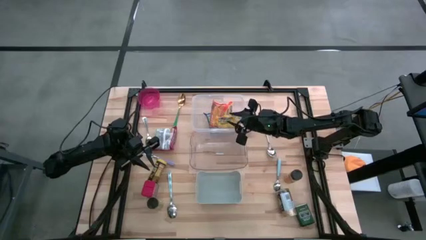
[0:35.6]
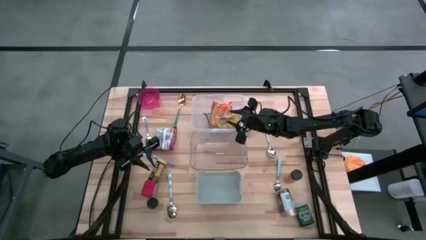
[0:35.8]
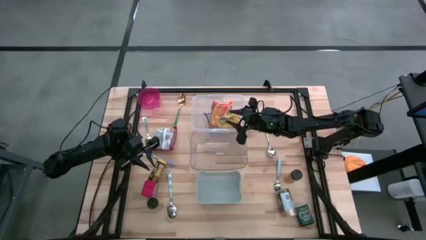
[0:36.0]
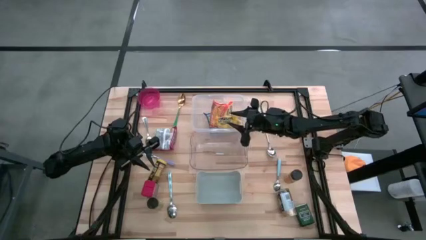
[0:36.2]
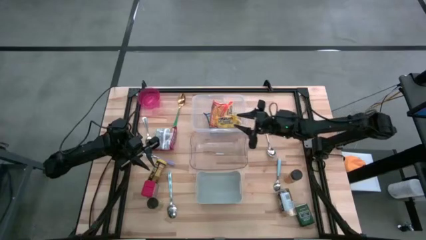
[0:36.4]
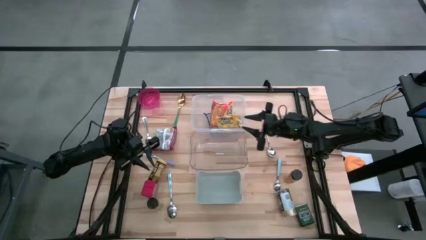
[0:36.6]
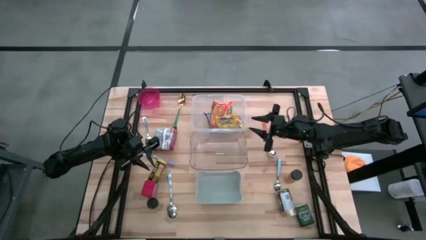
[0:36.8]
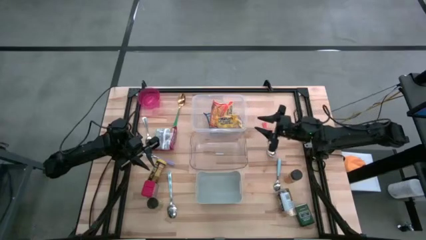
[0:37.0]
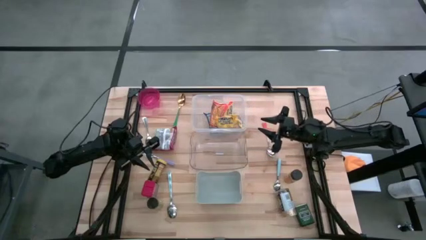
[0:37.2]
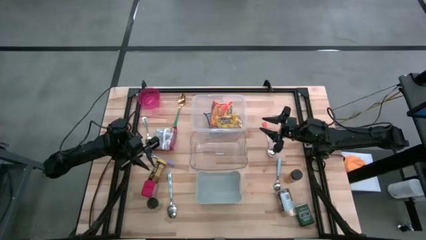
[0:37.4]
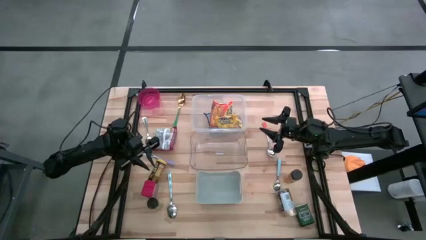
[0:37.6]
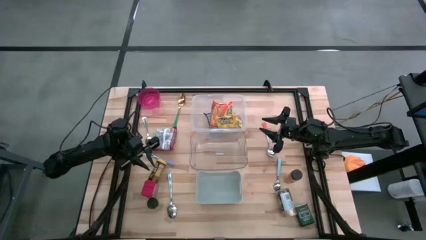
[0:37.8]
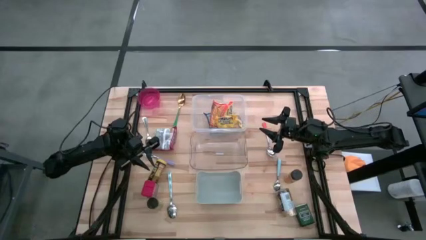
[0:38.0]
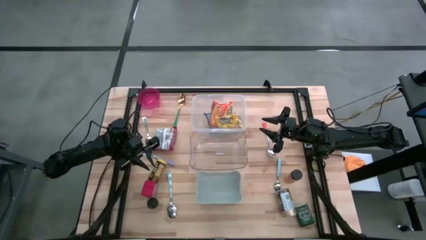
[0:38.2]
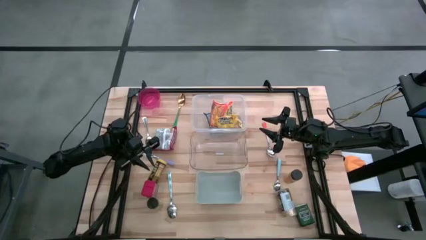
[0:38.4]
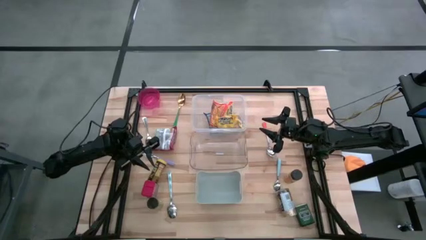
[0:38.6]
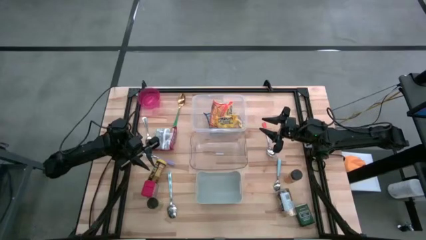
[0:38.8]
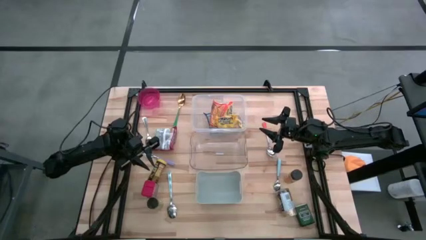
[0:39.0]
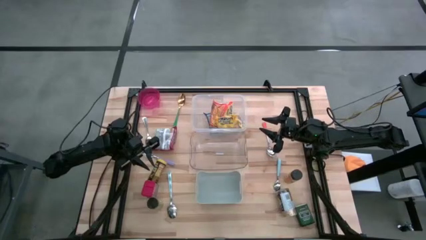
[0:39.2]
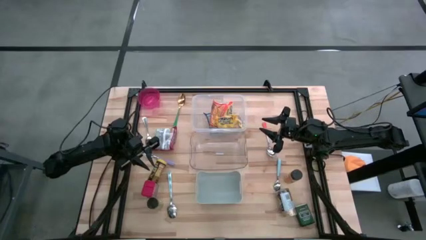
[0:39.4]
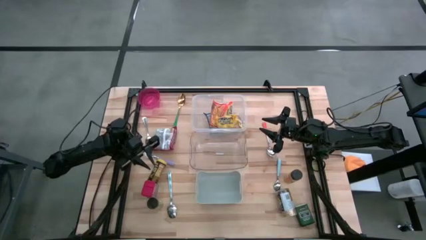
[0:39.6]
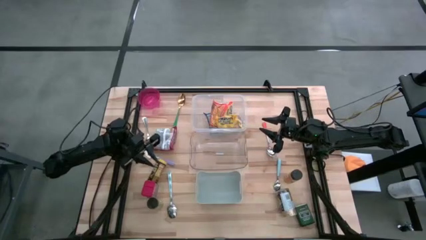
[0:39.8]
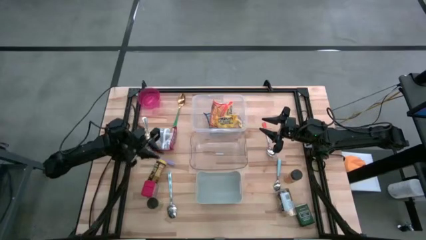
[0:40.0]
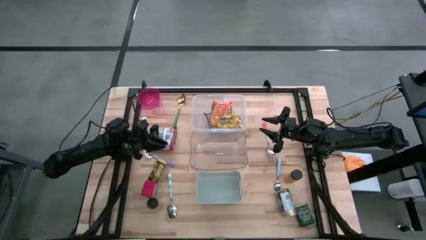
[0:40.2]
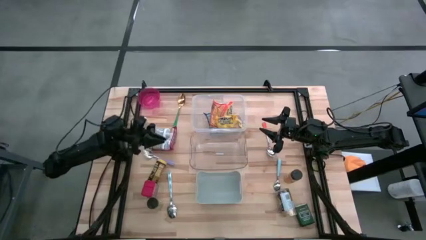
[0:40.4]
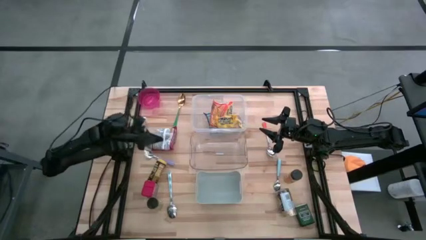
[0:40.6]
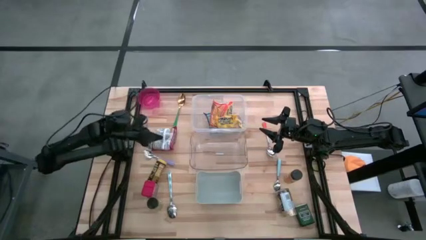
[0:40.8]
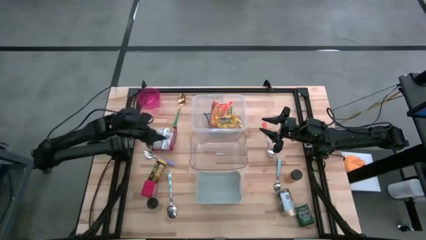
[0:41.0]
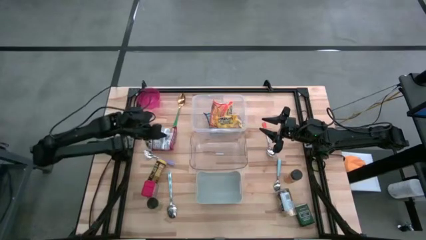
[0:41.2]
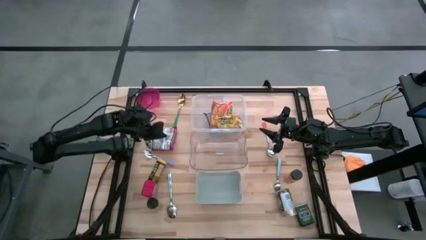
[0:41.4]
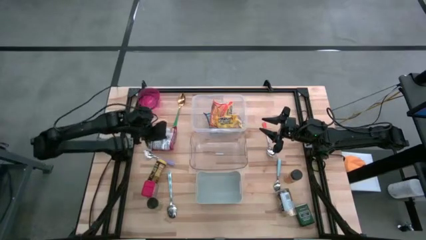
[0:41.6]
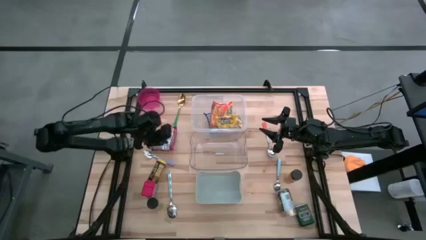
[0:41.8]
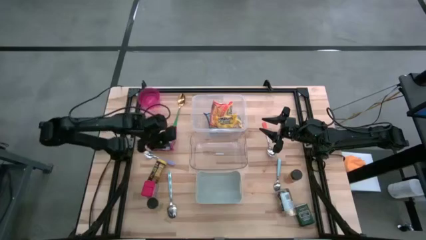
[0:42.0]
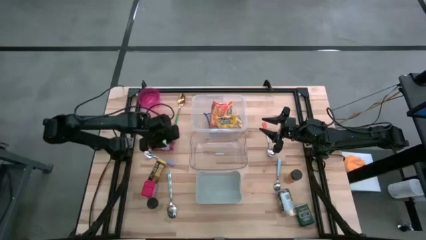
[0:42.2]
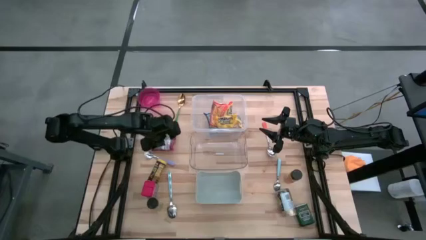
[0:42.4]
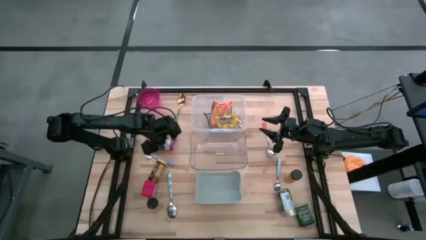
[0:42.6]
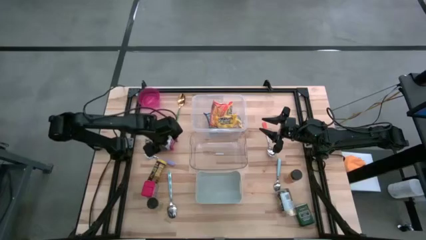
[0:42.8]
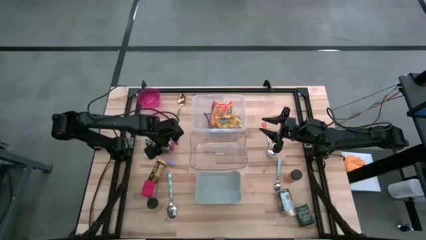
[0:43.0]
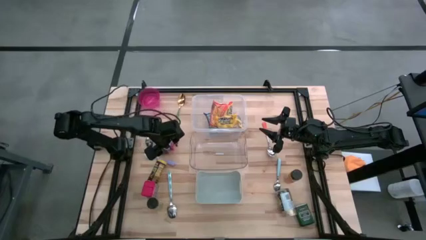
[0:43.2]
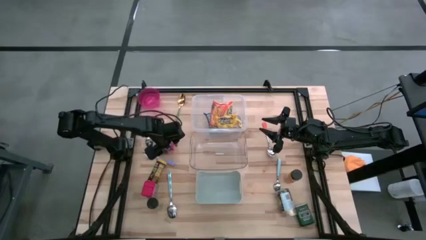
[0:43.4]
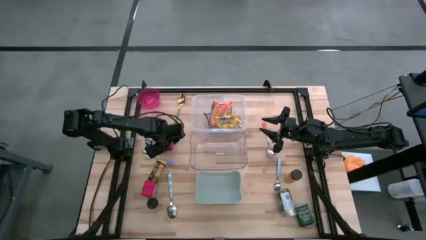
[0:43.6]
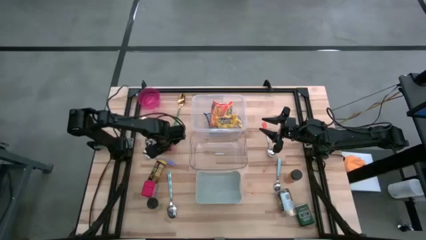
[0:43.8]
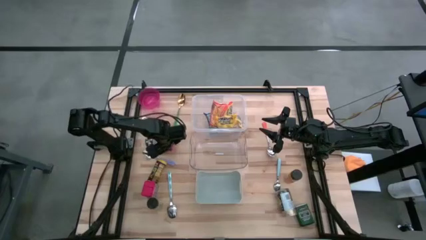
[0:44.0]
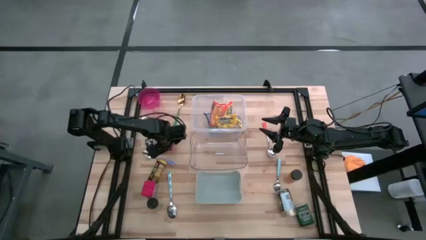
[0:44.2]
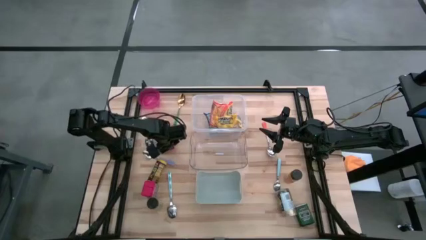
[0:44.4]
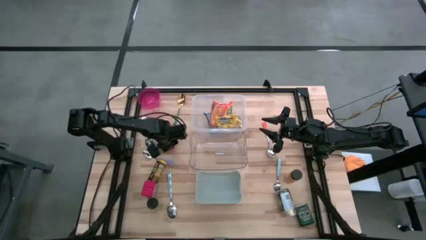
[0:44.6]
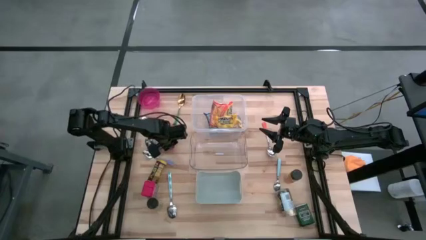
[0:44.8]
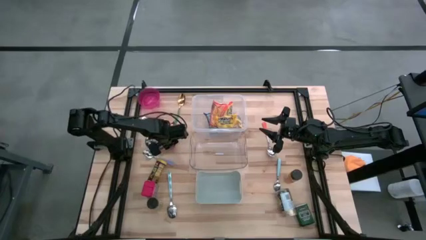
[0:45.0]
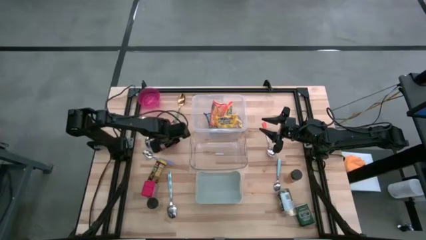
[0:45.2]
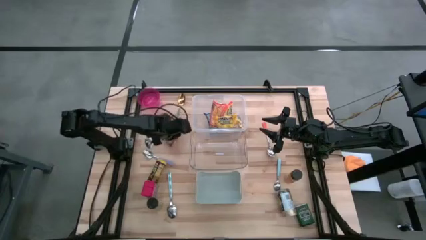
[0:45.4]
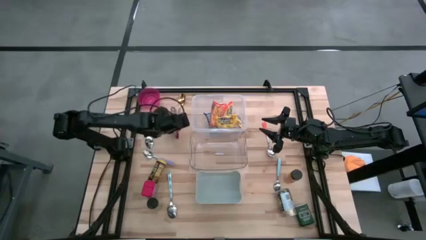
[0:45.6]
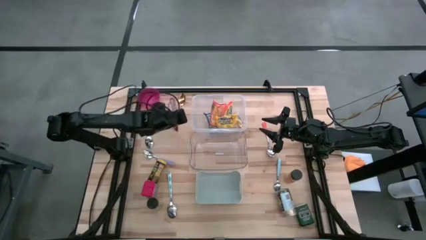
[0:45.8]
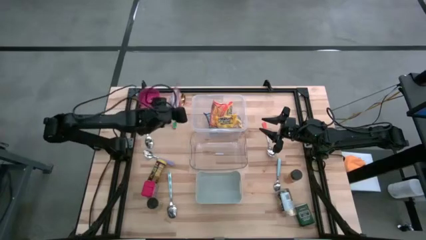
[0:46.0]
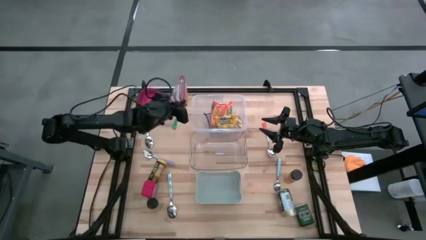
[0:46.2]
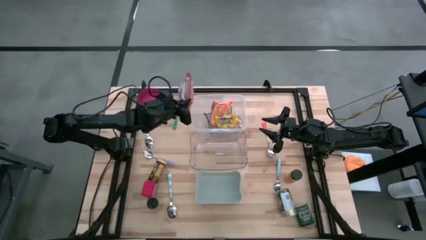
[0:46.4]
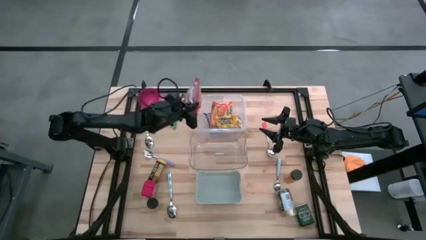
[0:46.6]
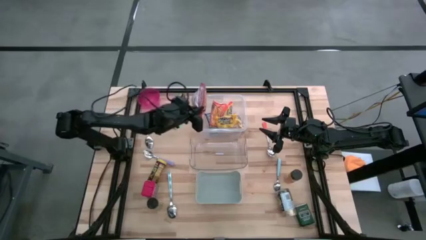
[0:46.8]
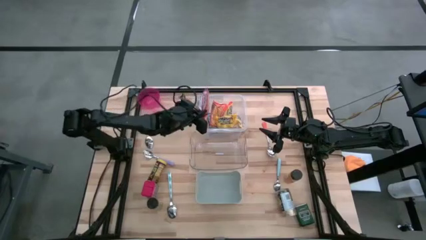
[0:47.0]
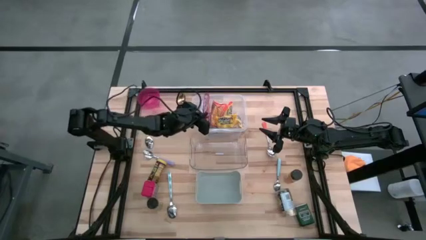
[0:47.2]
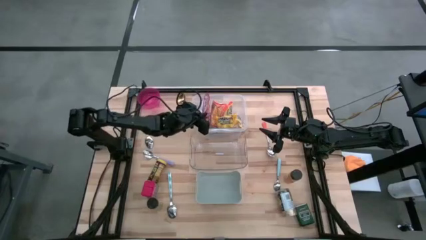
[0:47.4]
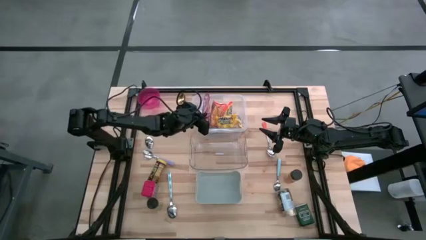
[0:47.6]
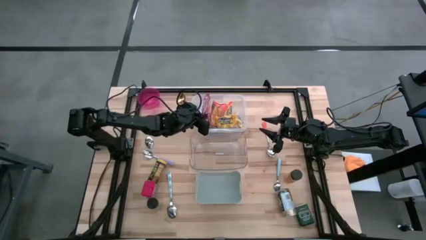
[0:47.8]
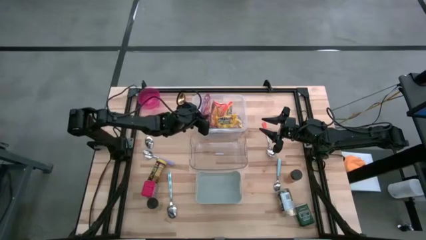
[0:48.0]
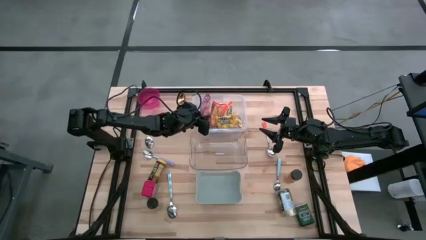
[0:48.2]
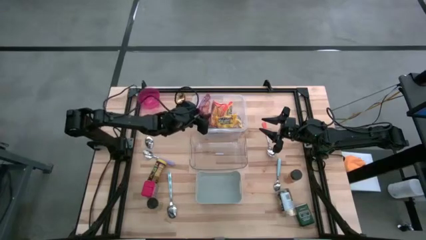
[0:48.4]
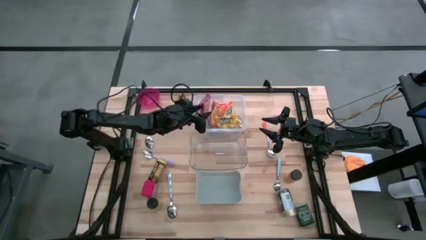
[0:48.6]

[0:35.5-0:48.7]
Put the red noodle pack into the white bin
